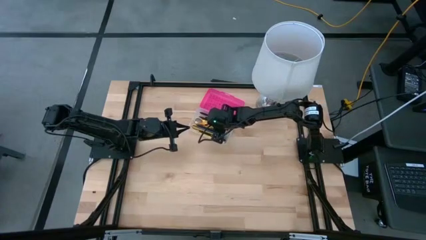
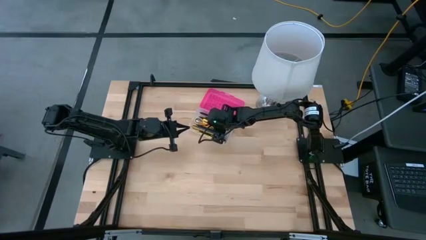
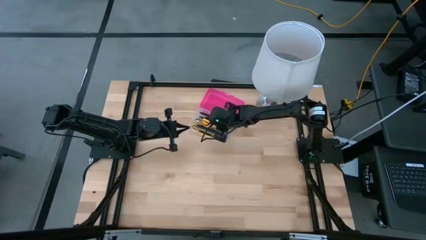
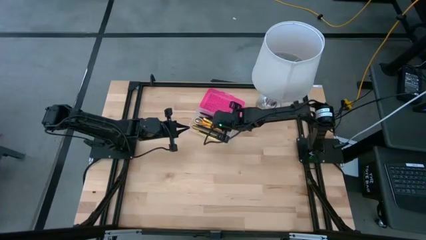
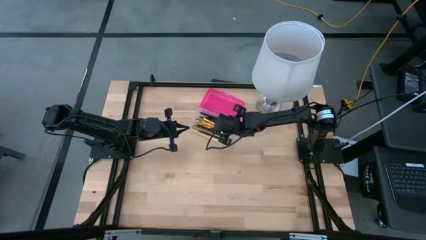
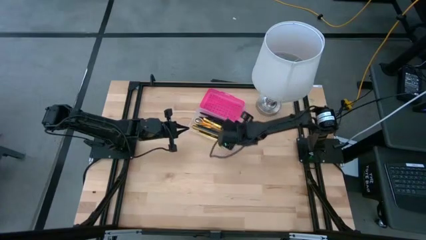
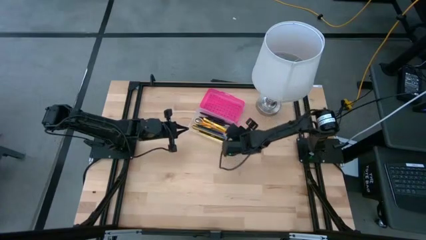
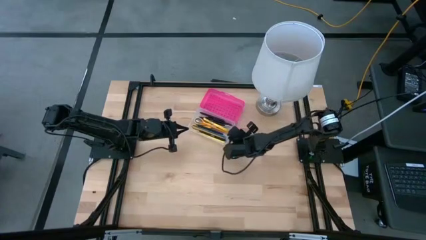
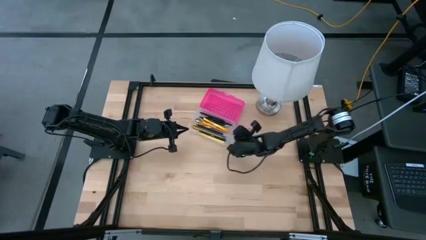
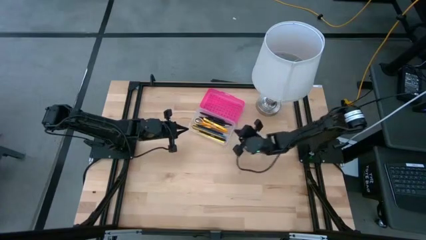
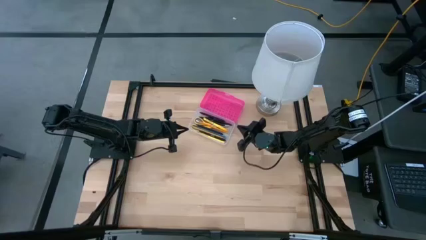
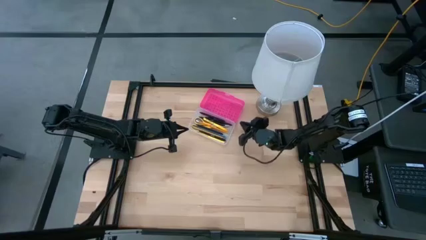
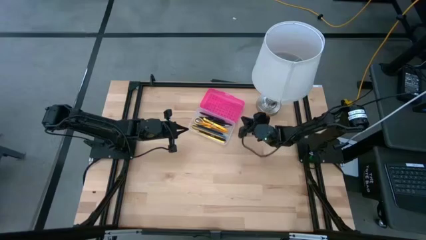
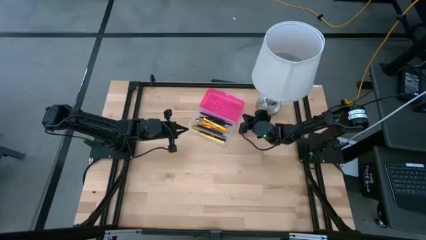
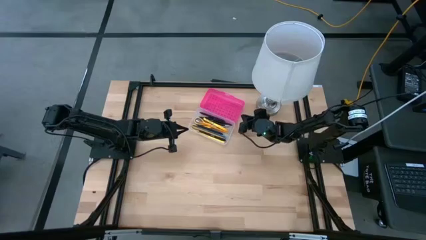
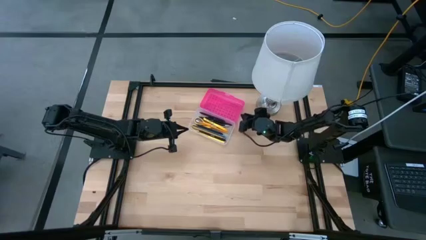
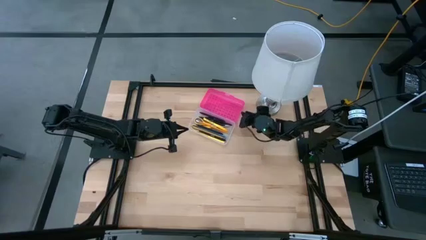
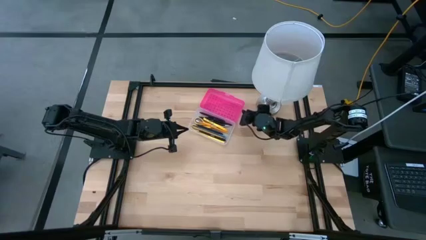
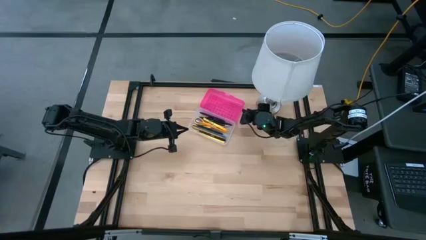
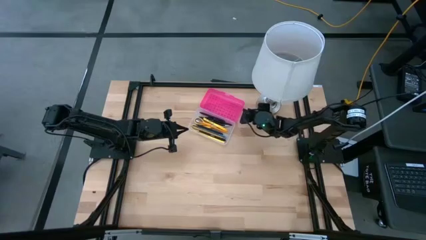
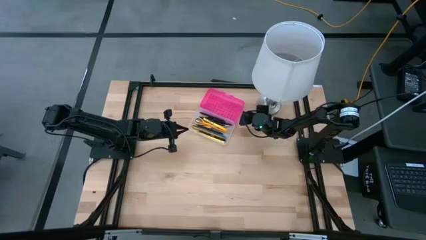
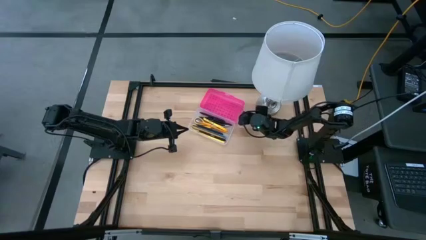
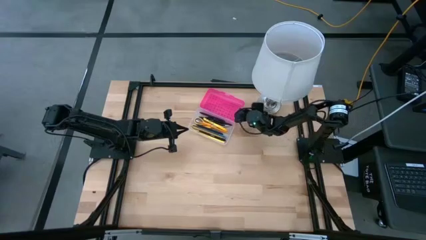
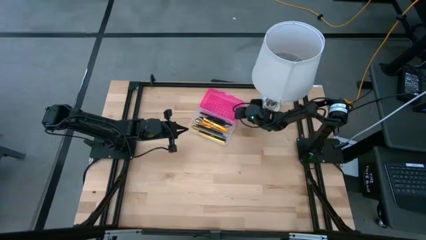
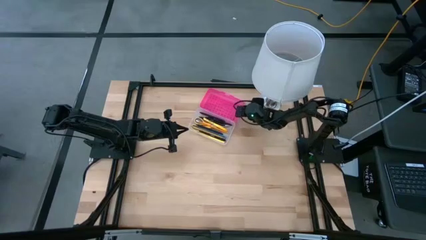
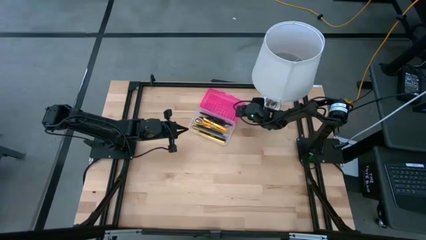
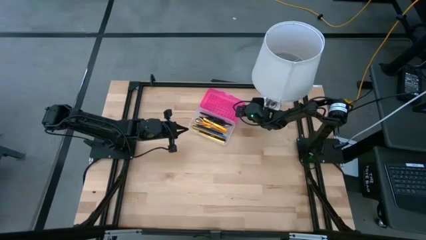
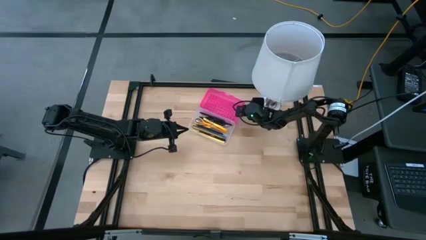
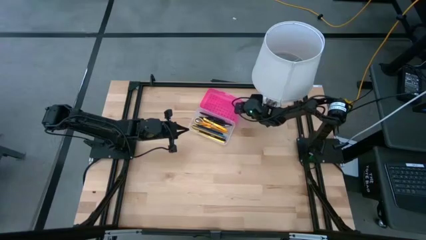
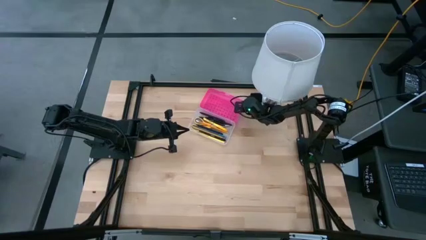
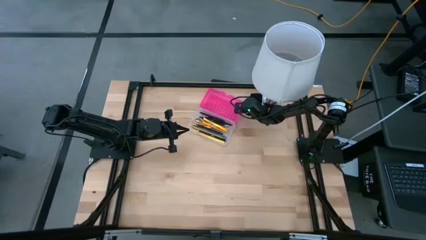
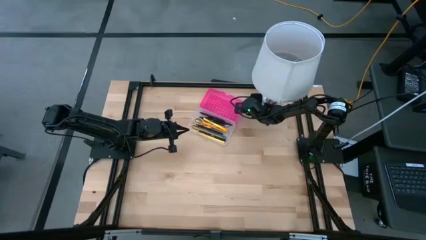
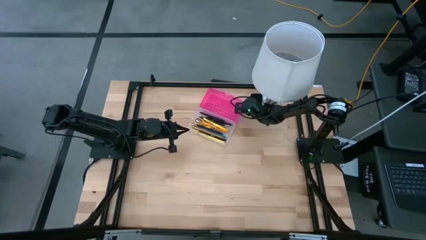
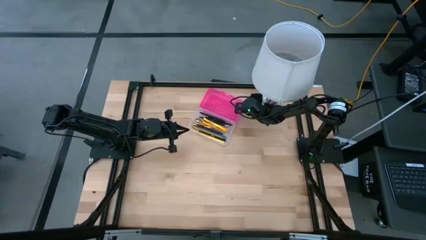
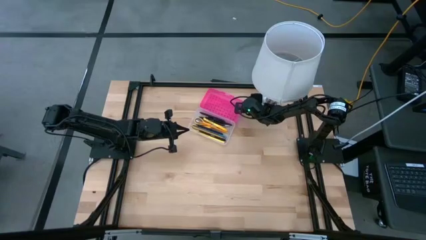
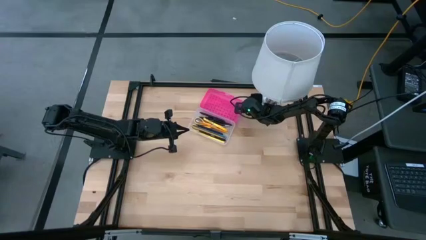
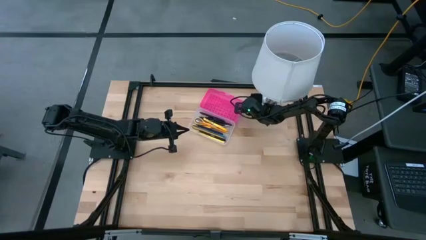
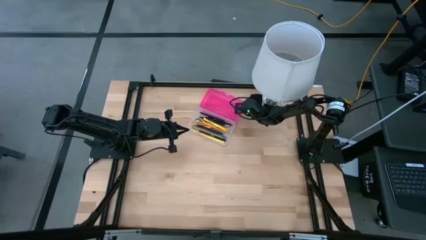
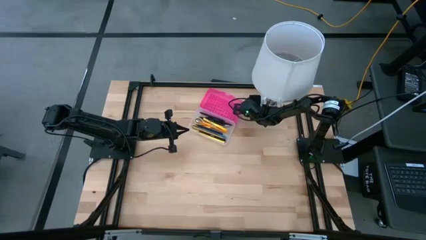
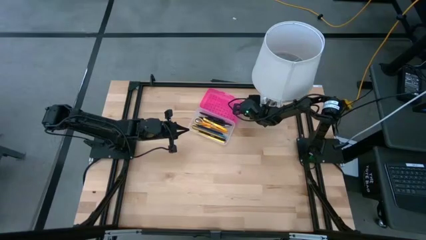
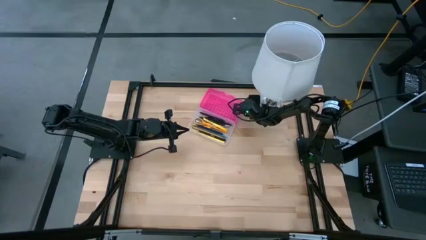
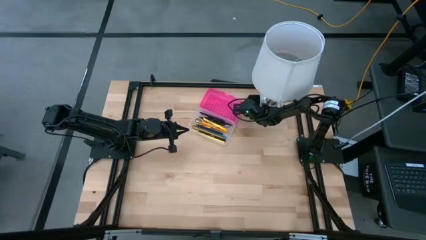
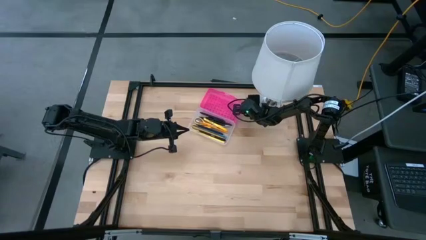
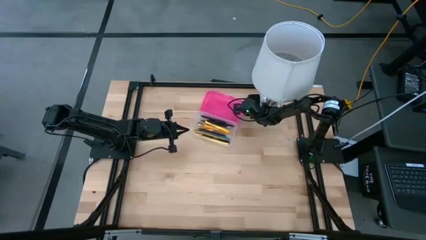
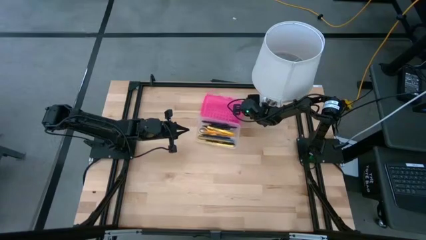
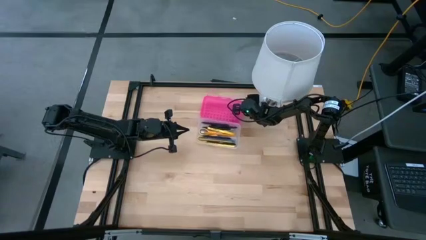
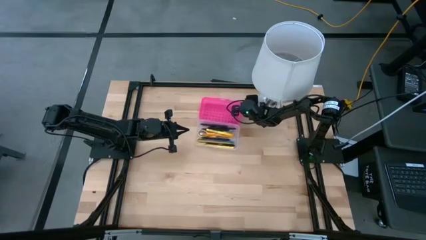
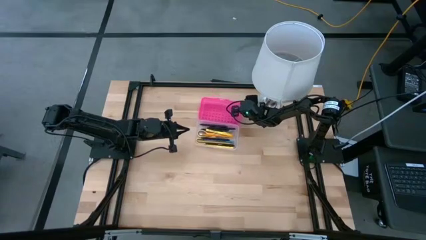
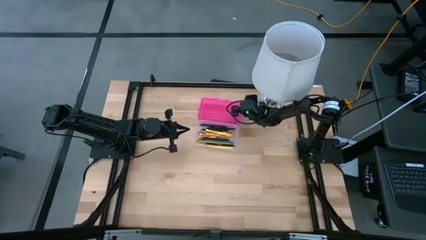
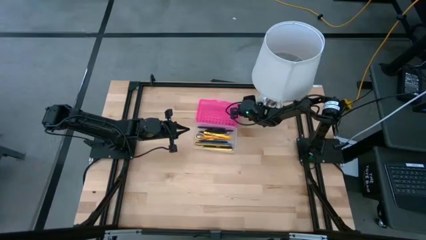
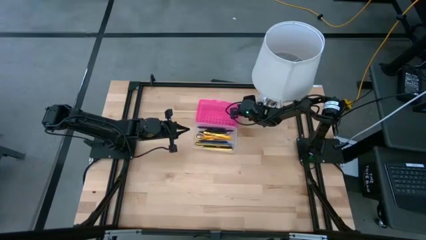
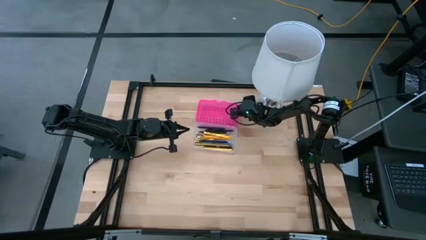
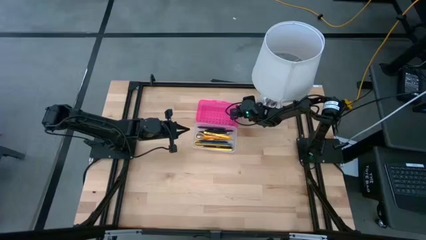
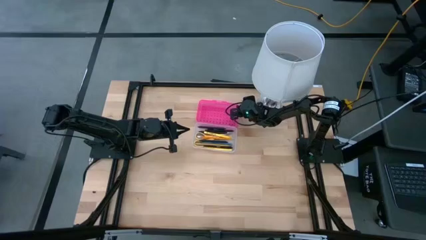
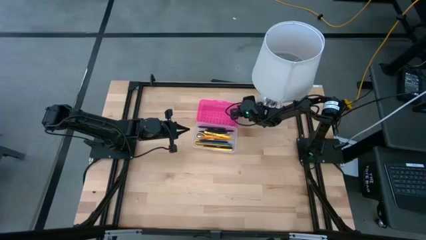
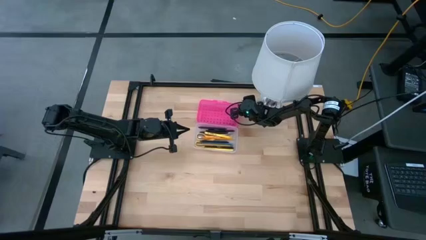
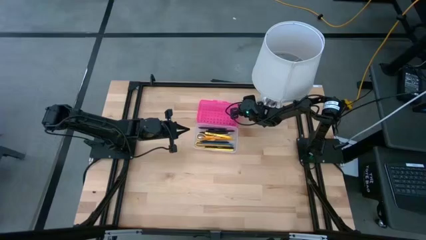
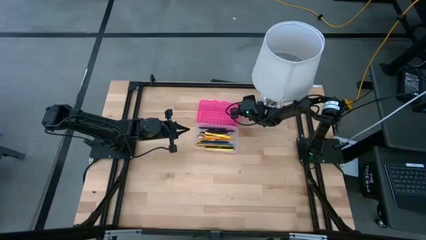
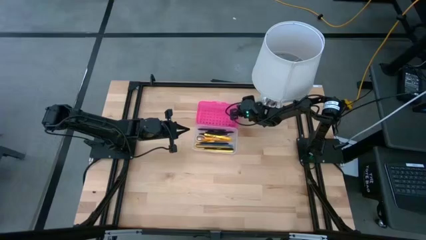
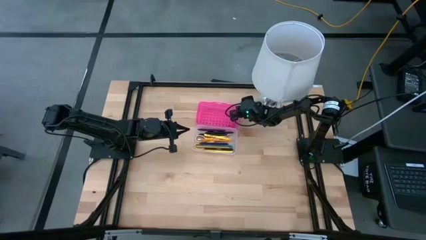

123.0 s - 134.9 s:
Task: Pick & place school supplies into a supply box
Close the pink supply box

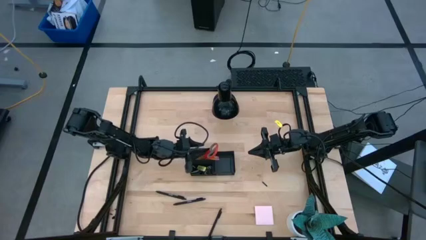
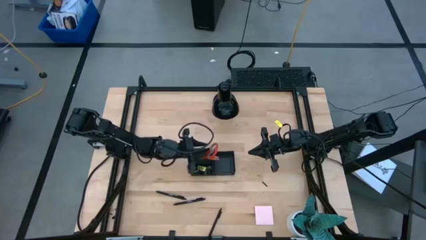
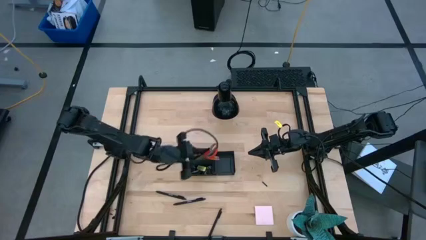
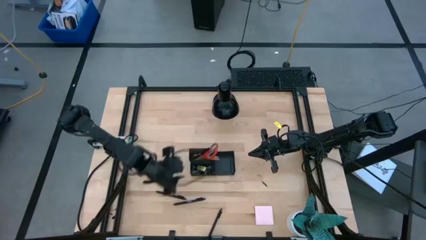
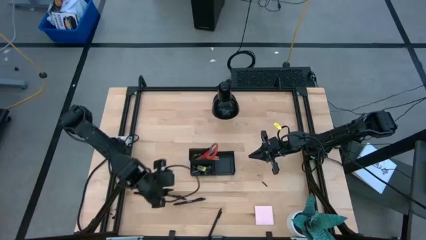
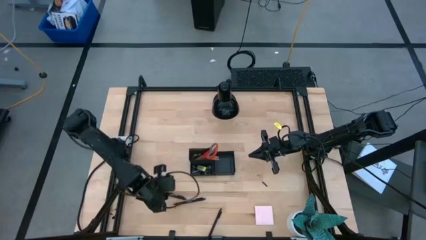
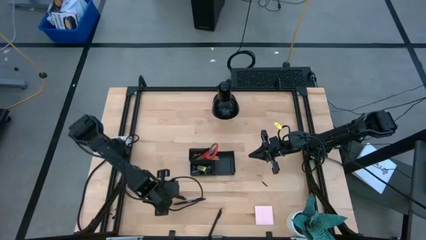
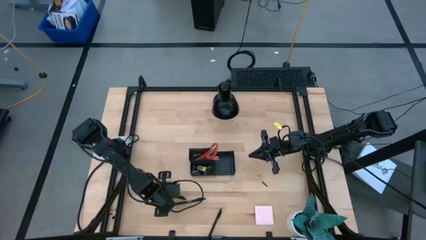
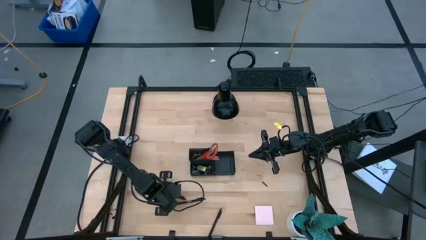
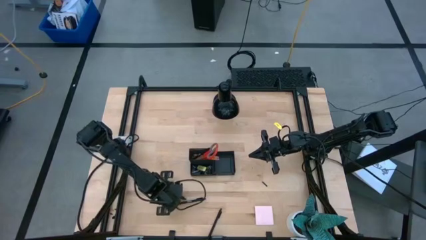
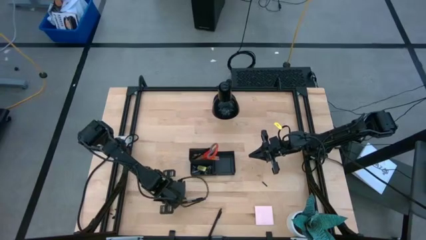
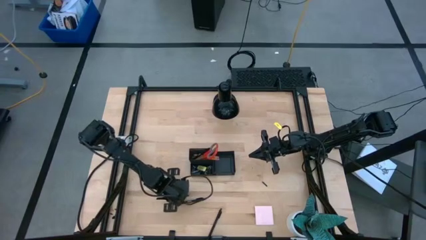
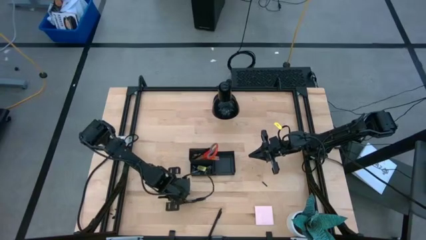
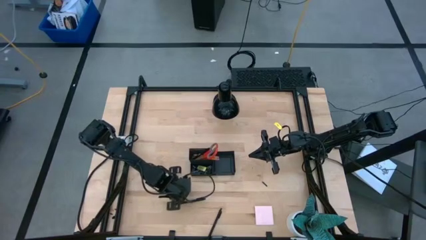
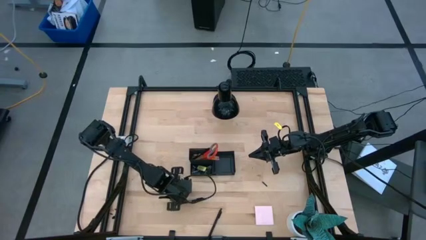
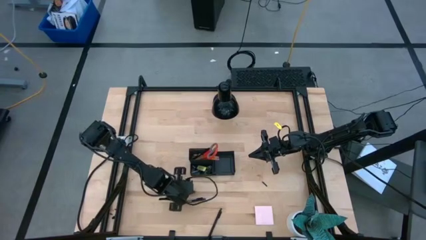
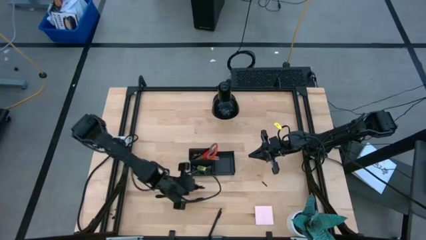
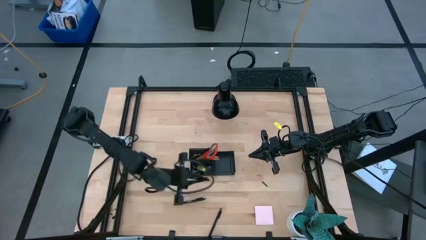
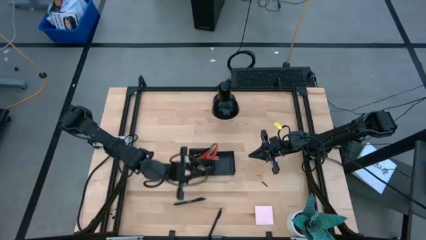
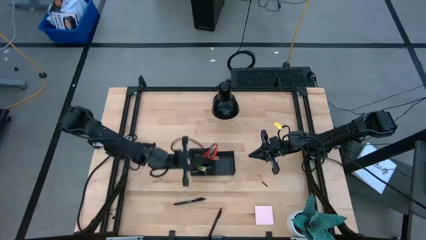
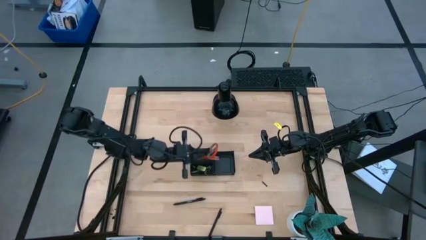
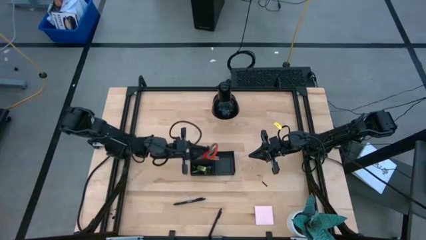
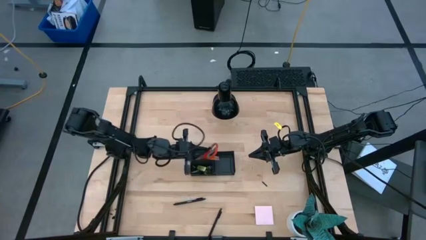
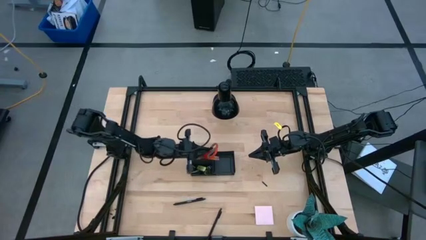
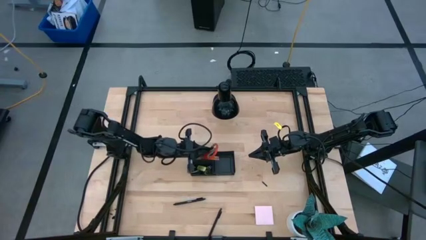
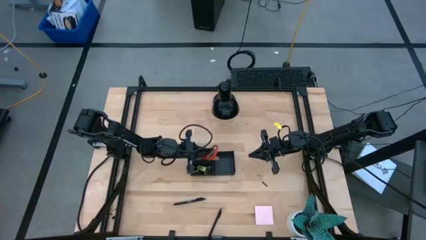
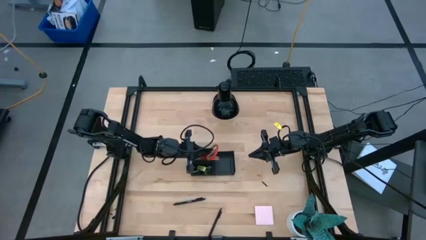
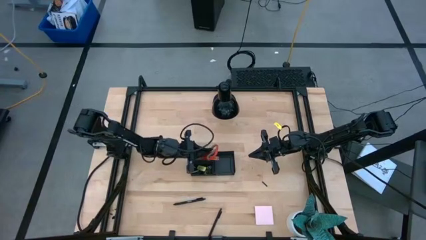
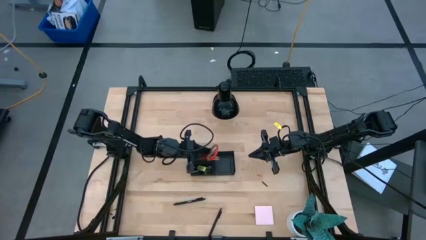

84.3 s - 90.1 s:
Task: Pick and place office supplies into organizer
Put the top pen into the top left section of the desk organizer
